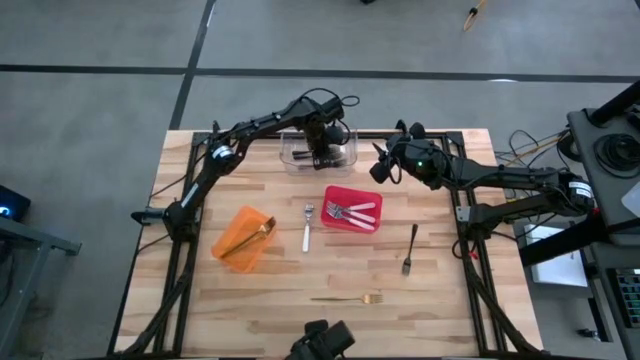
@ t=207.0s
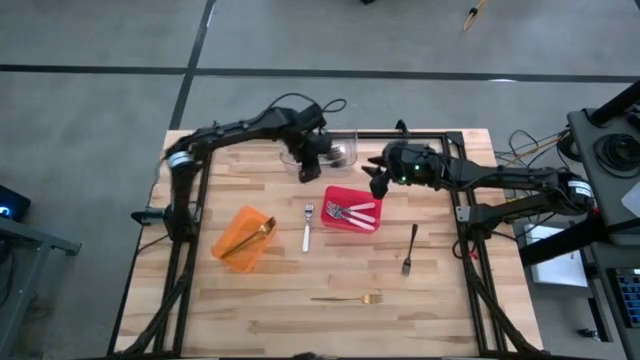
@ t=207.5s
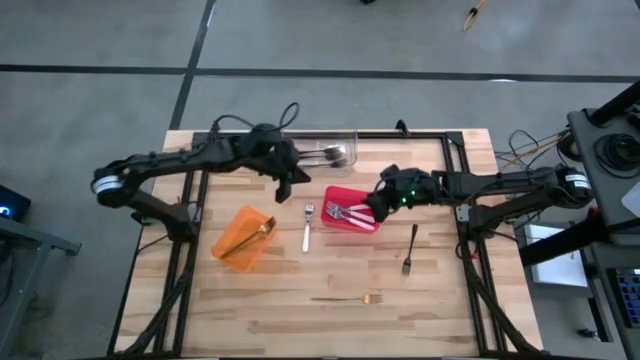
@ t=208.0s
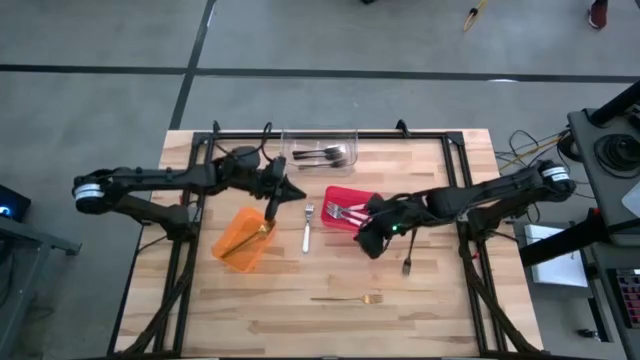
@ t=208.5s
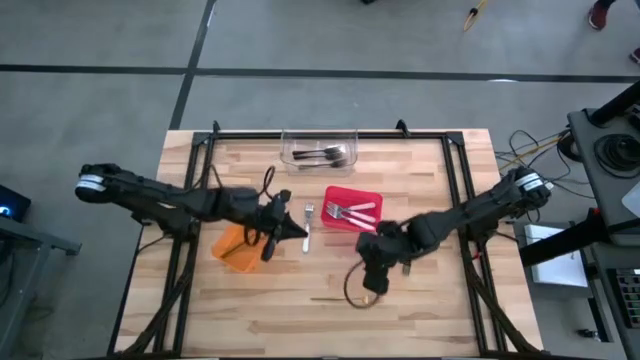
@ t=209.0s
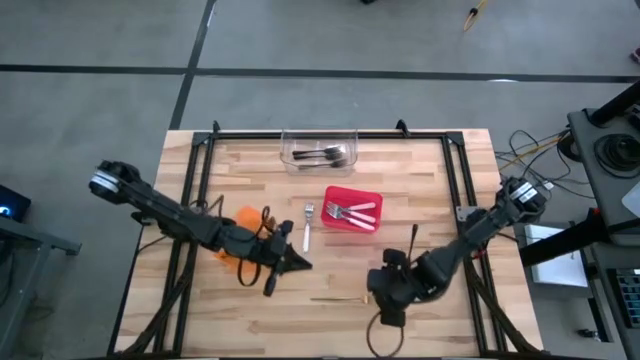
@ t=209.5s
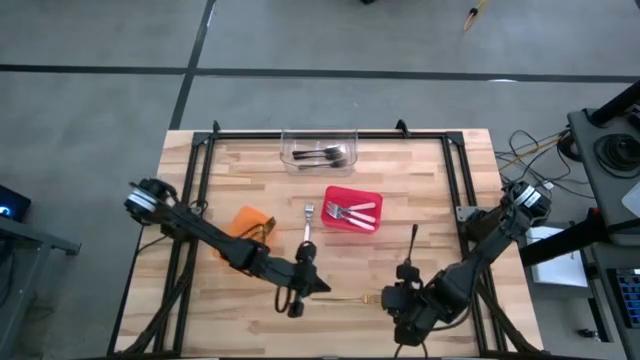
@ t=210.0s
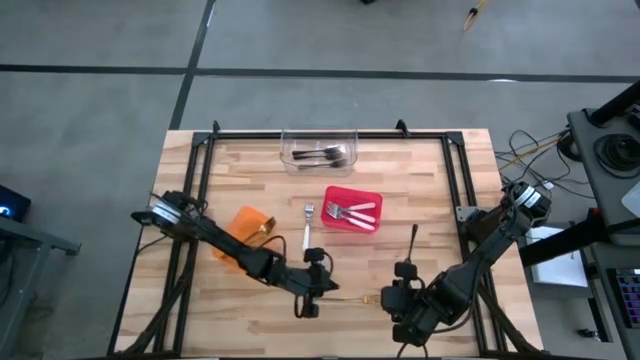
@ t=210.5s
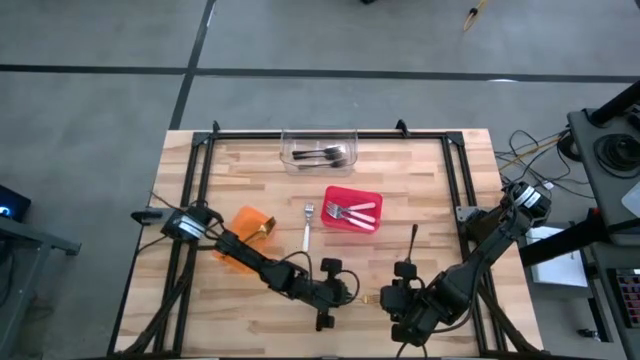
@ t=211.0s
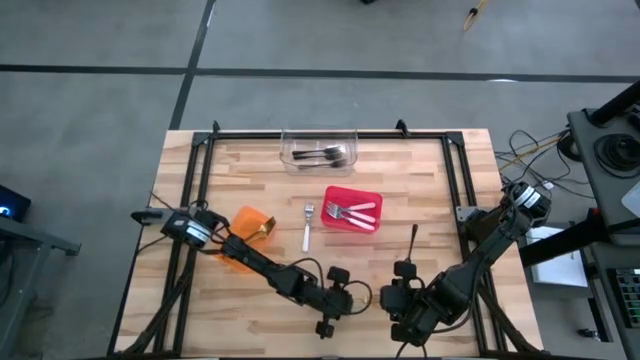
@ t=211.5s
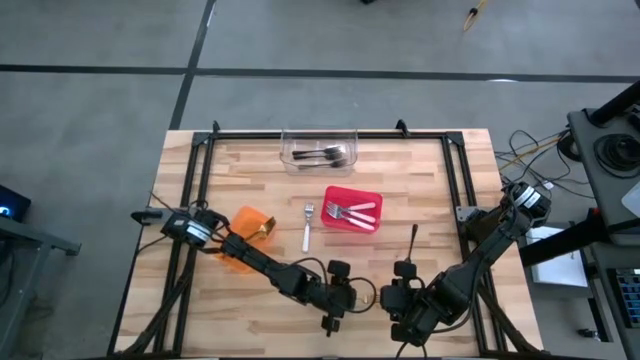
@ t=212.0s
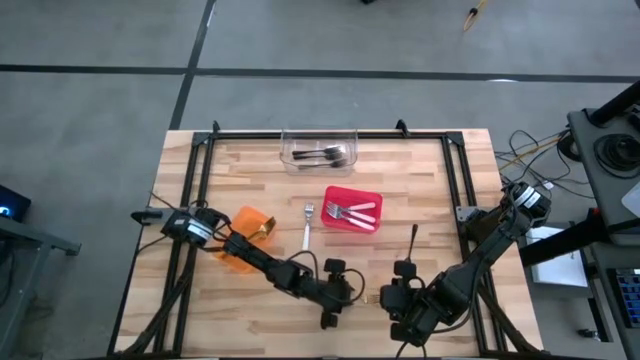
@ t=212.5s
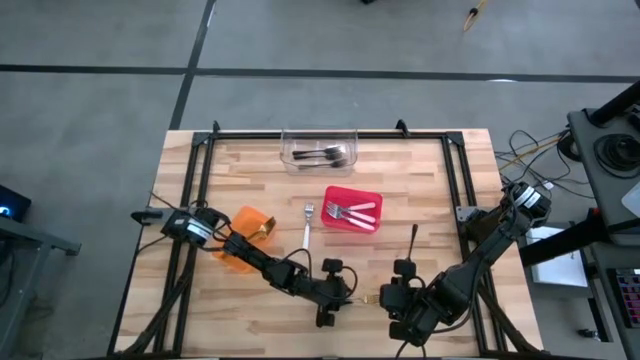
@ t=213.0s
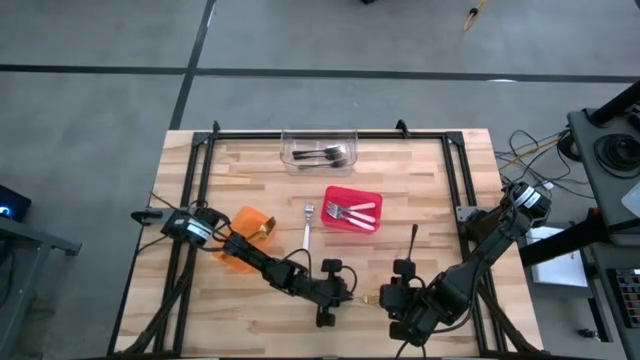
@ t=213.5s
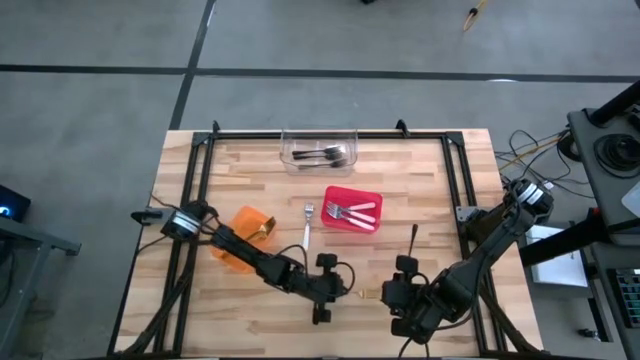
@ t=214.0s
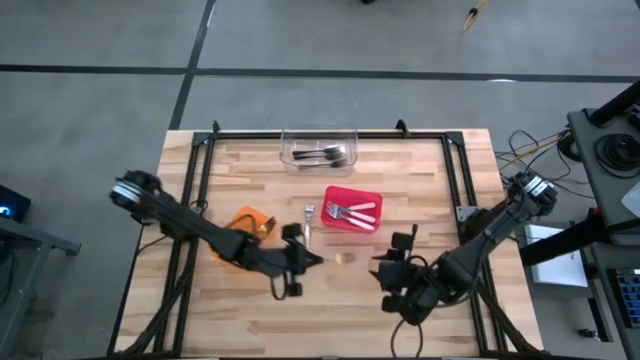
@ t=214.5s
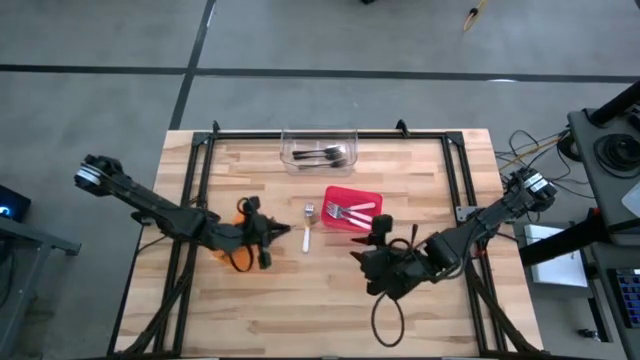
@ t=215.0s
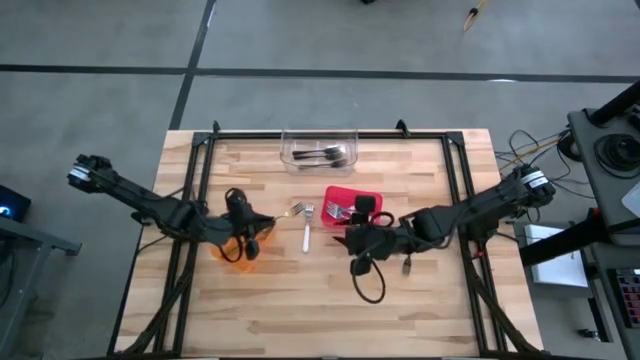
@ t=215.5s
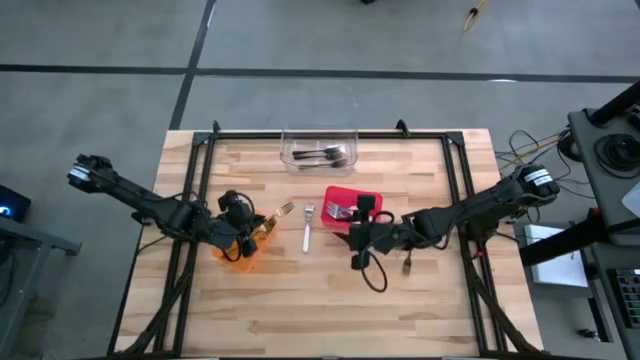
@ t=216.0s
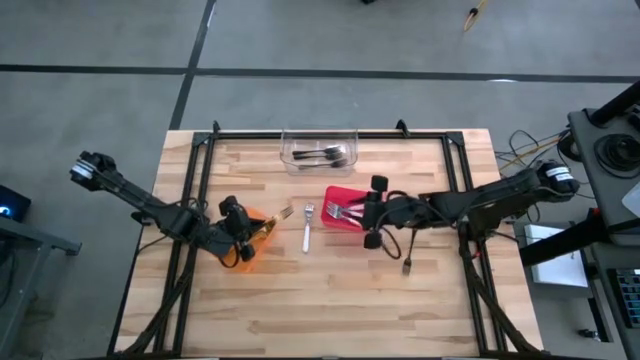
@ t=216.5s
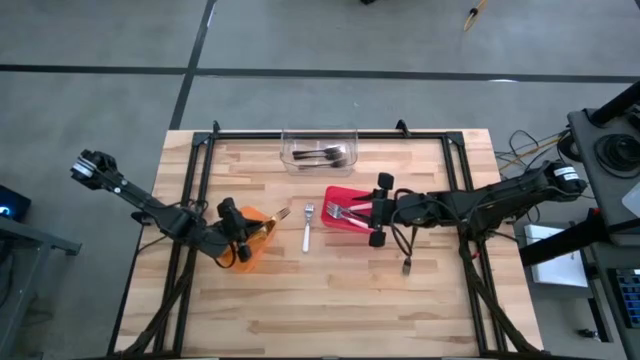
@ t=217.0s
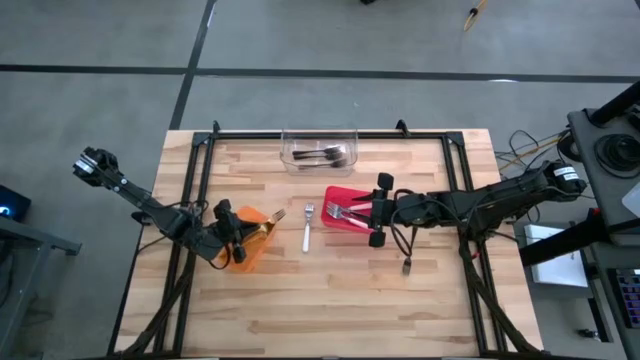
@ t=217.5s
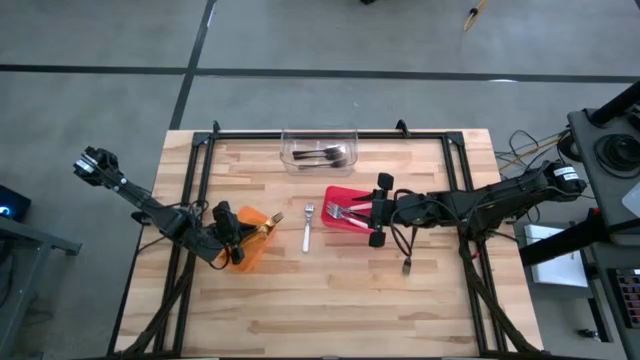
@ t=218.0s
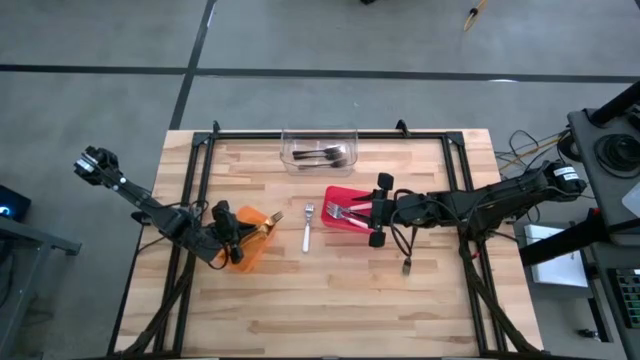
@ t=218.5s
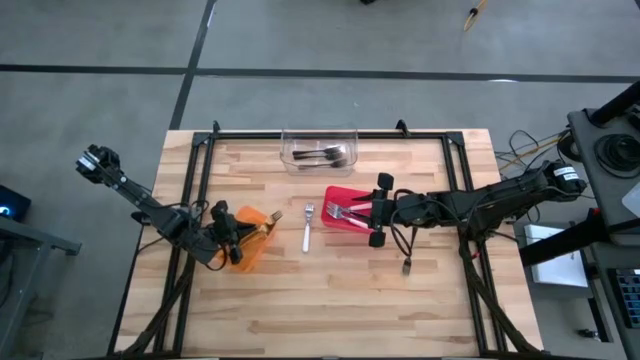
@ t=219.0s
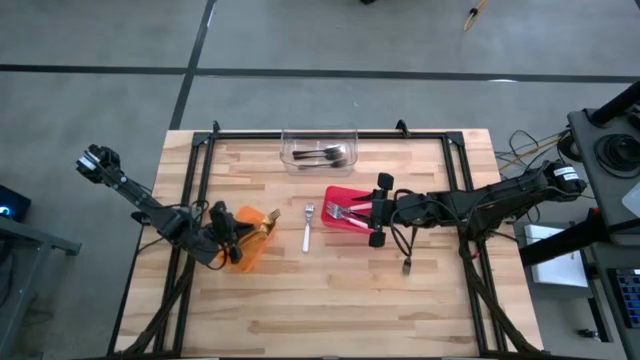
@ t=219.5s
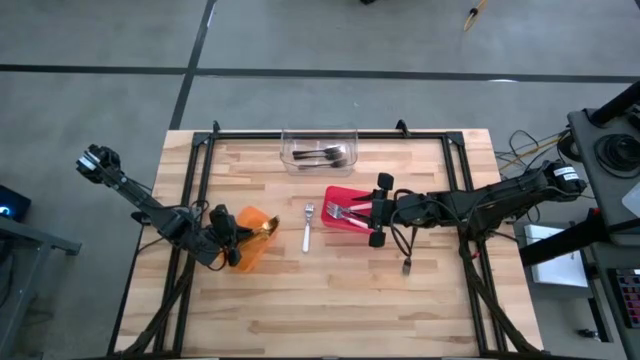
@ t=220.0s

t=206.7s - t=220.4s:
Task: Sort silverware by color (type)
Put the gold fork into the orange bin

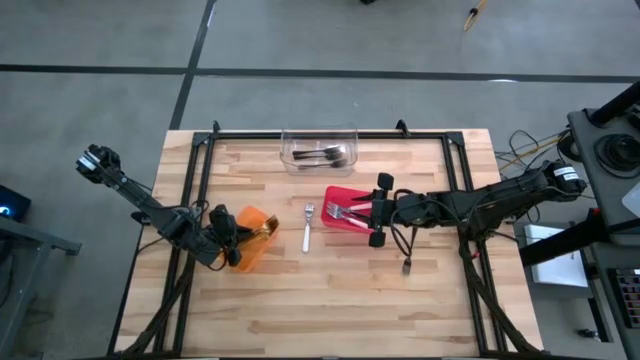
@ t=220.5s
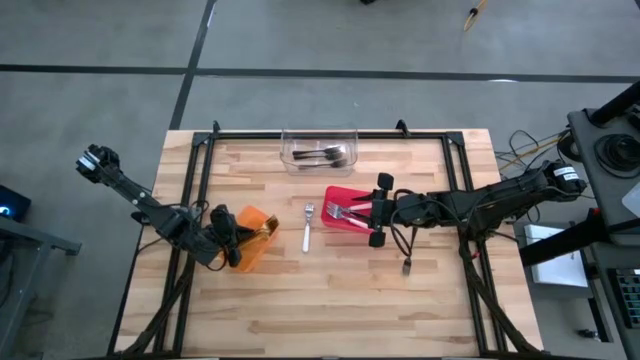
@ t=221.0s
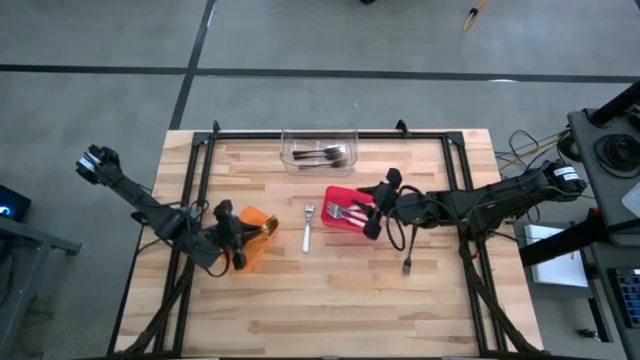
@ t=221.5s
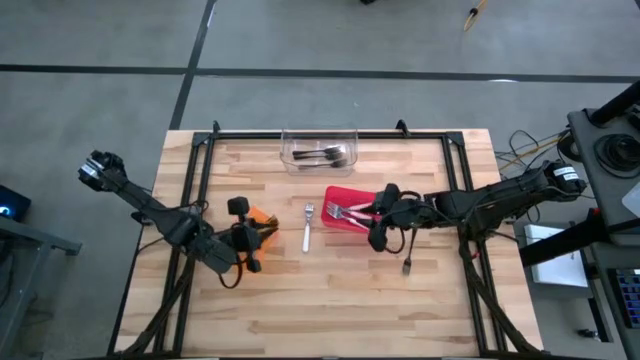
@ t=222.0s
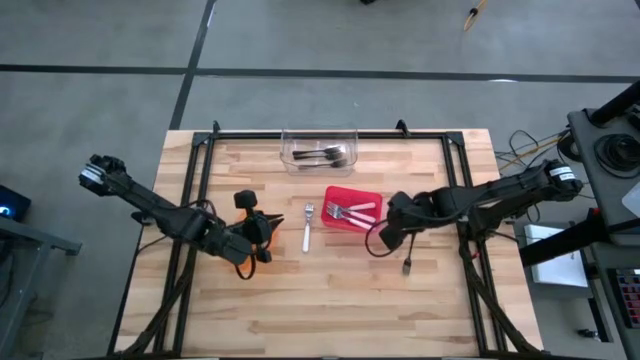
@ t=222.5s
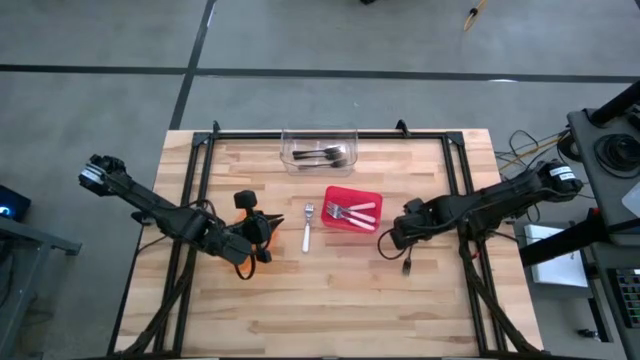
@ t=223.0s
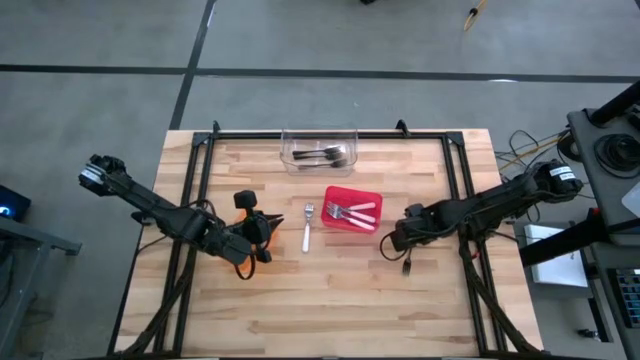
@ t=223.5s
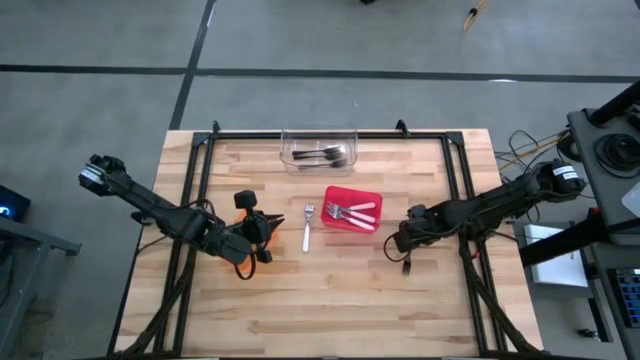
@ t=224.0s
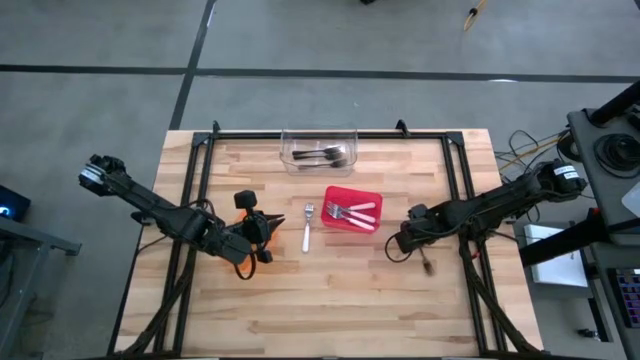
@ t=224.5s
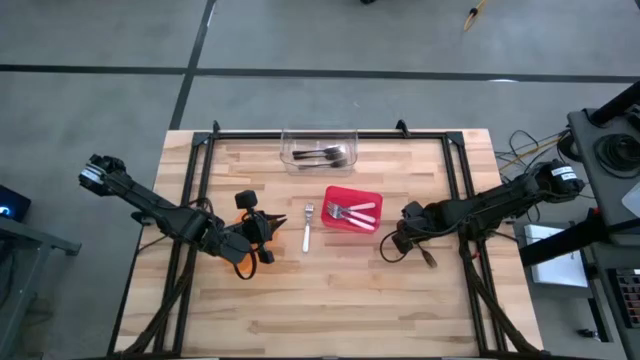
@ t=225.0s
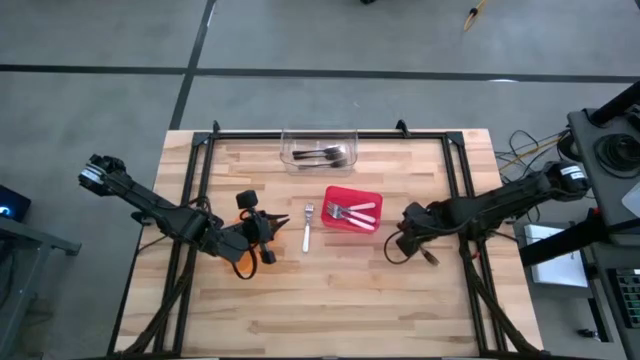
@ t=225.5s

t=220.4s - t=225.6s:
Put the black fork into the transparent bin
